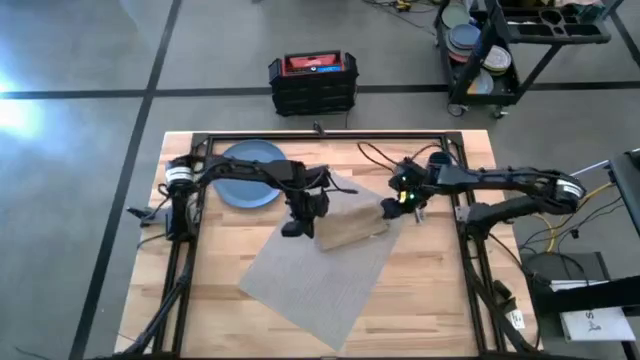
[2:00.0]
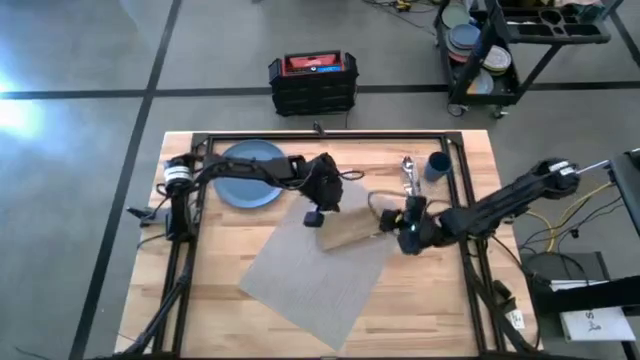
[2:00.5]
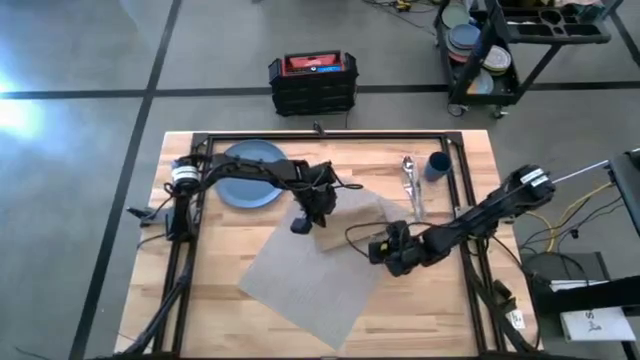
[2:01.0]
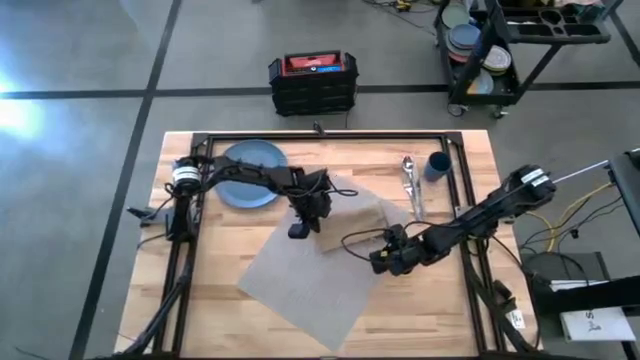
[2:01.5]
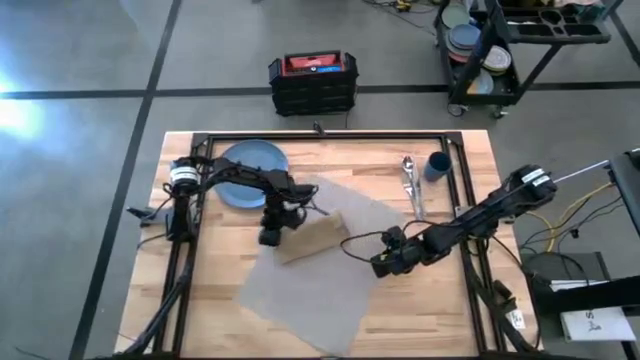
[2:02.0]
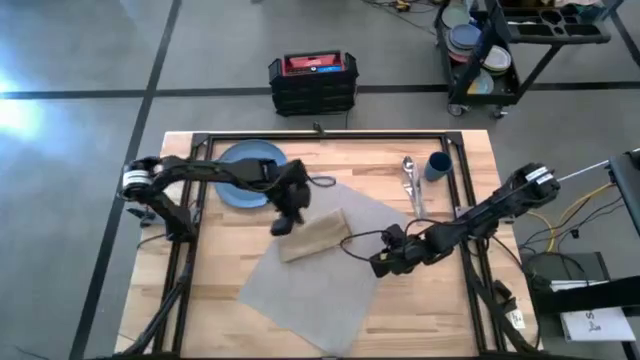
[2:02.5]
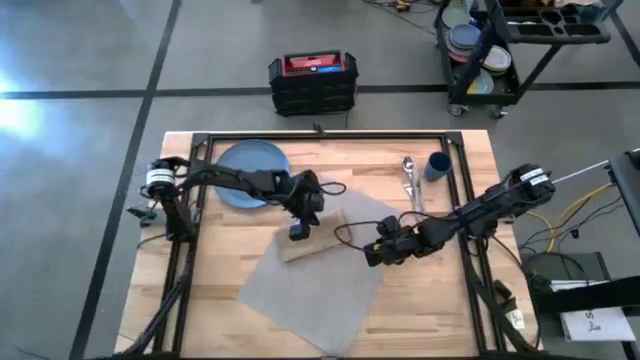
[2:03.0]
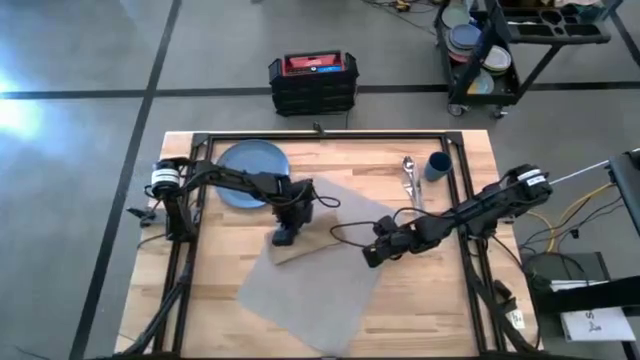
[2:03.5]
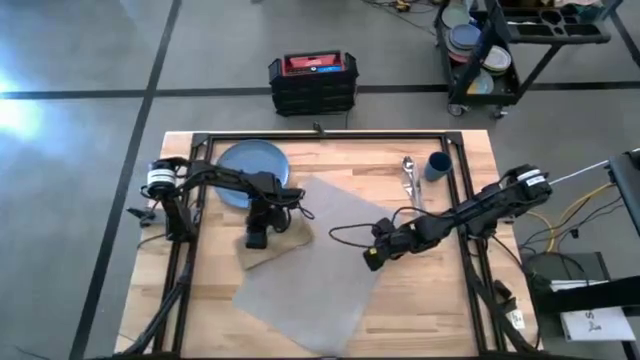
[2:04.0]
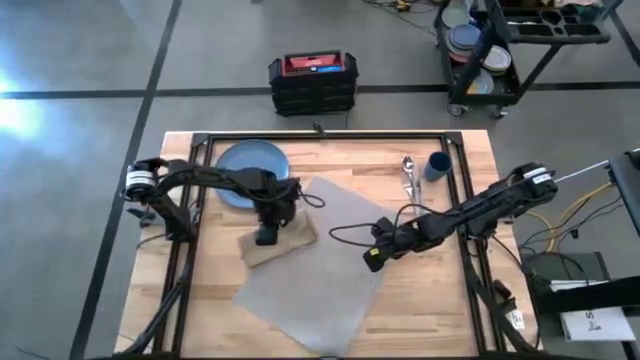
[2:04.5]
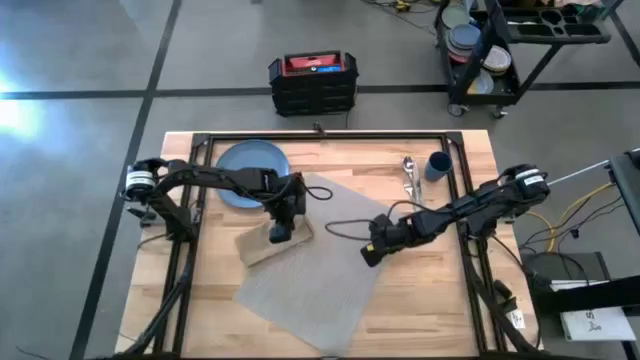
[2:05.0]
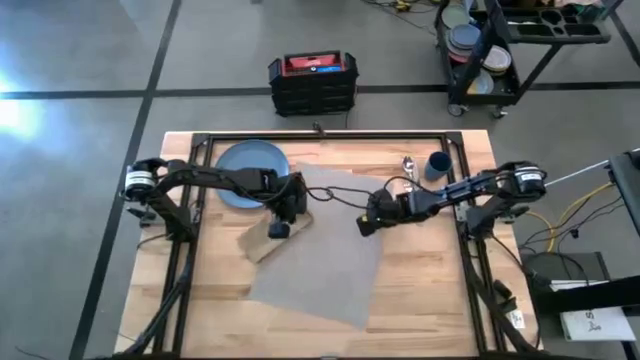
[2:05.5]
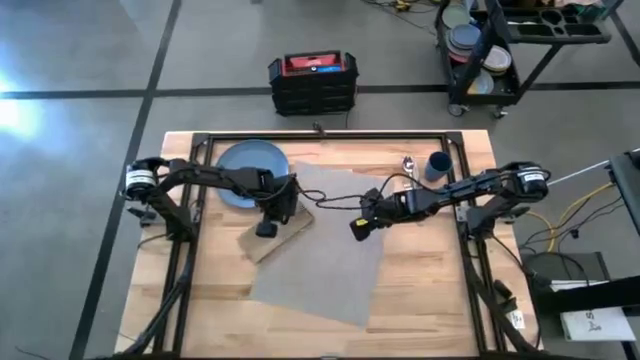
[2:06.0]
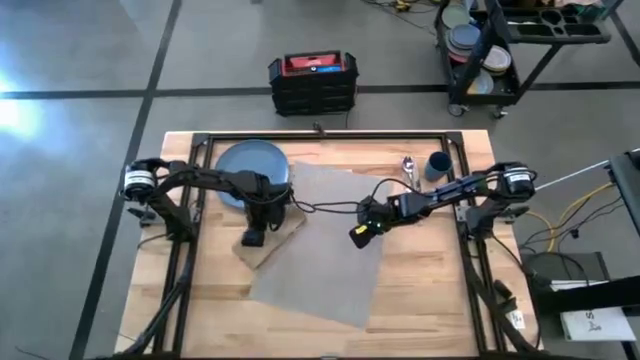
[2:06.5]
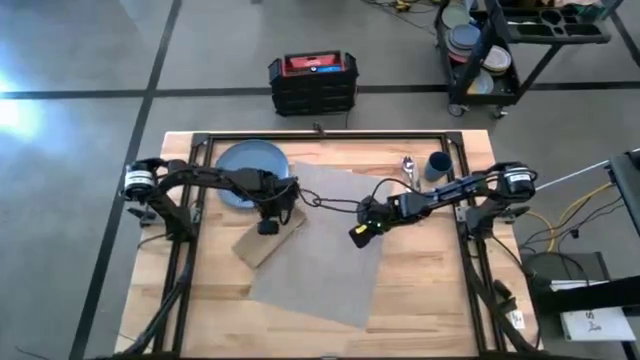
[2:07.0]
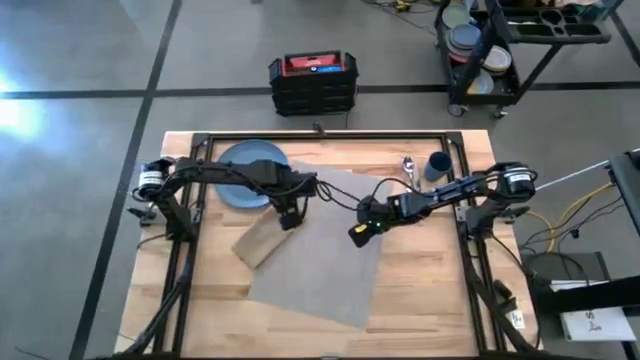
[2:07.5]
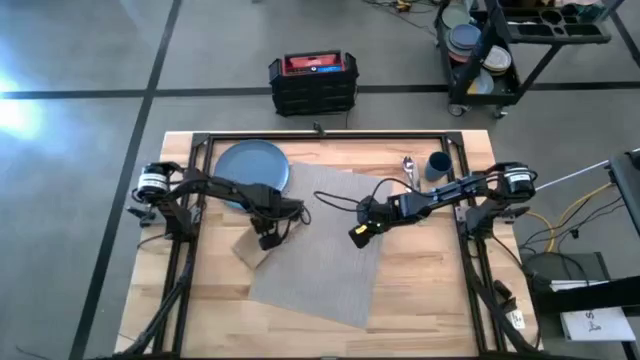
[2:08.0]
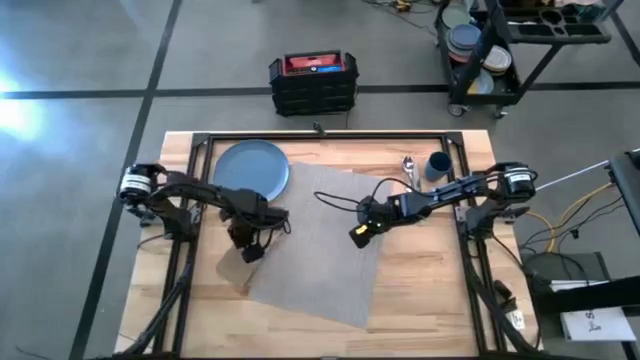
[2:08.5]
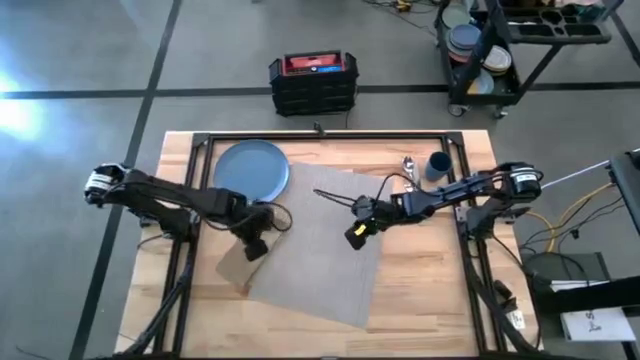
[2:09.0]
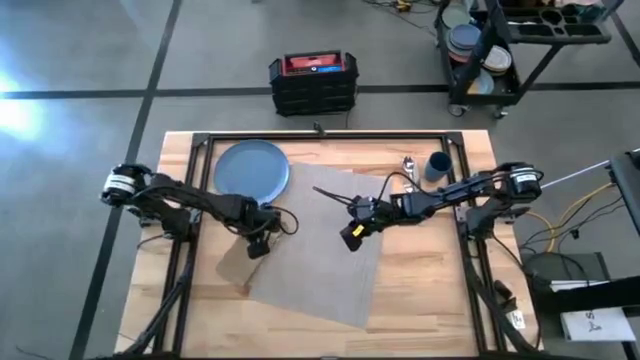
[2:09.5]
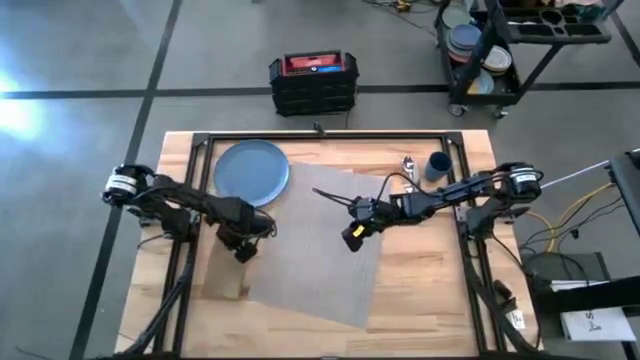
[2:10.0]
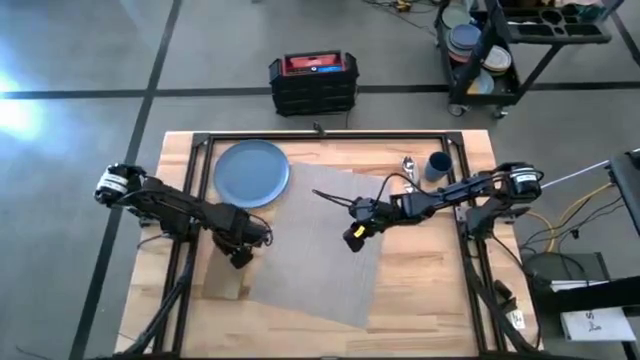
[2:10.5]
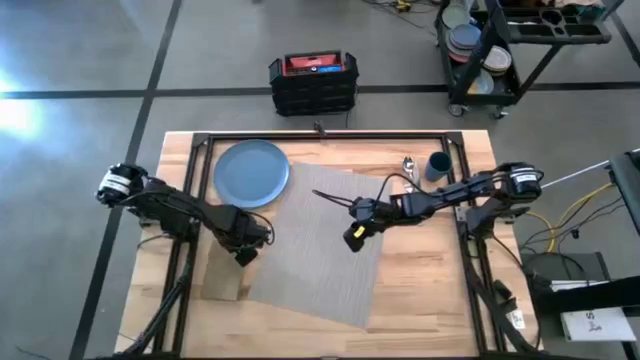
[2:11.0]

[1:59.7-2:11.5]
Task: Set table place
Move the brown table napkin to the middle left of the table

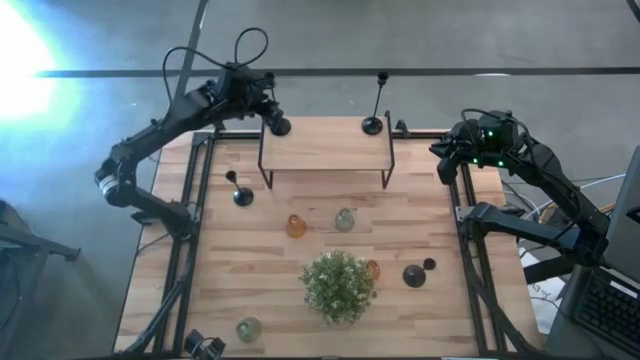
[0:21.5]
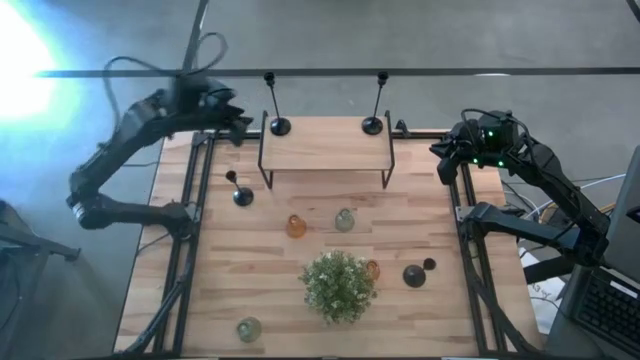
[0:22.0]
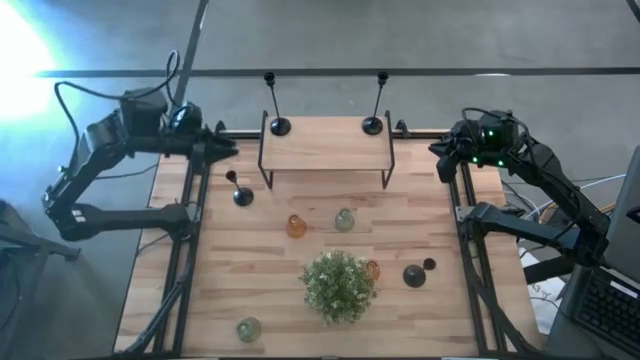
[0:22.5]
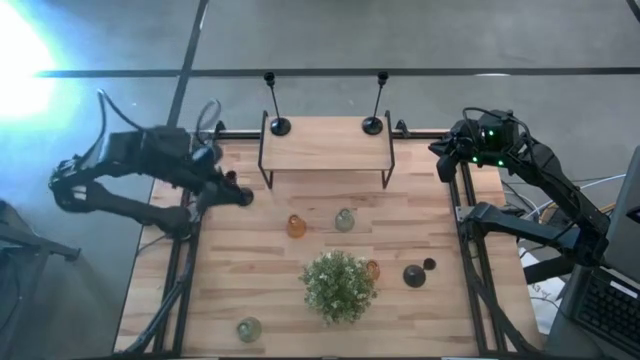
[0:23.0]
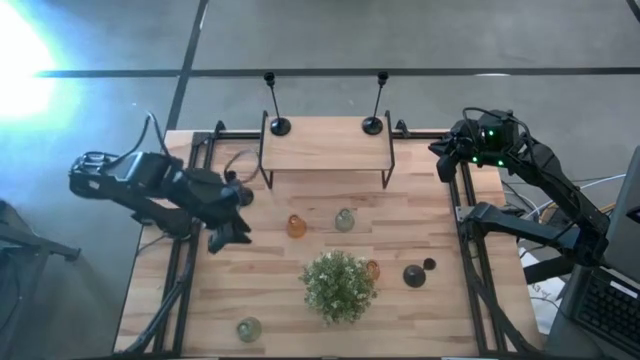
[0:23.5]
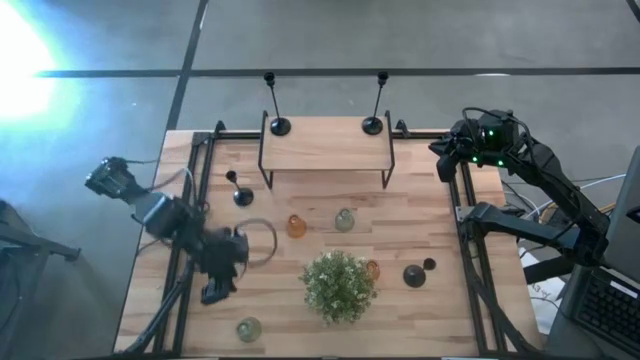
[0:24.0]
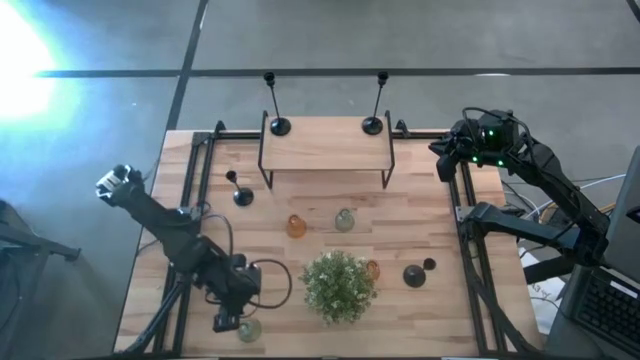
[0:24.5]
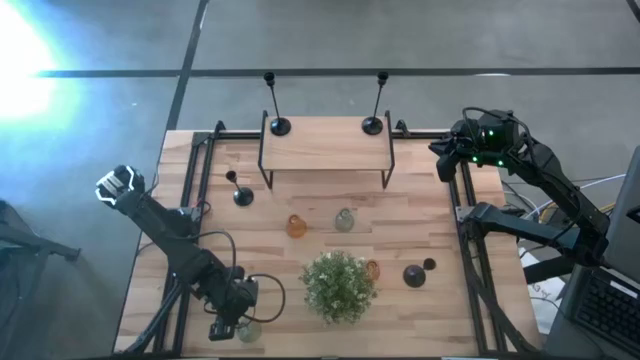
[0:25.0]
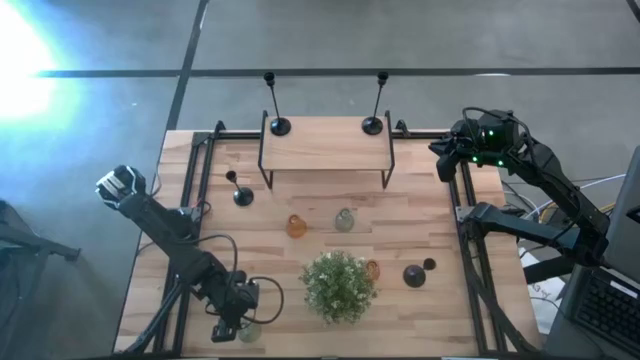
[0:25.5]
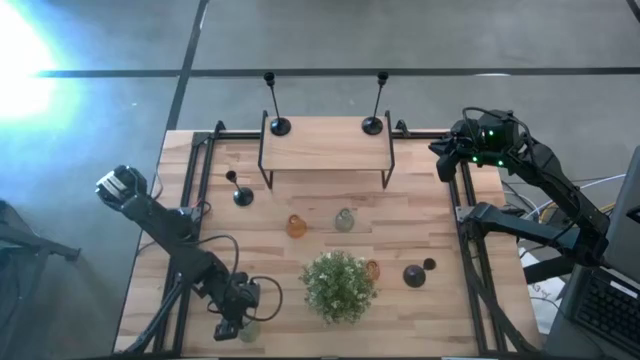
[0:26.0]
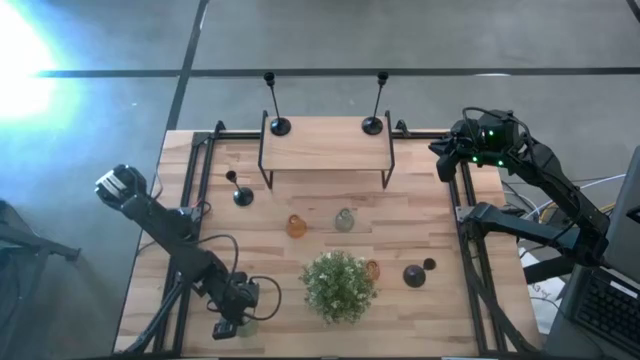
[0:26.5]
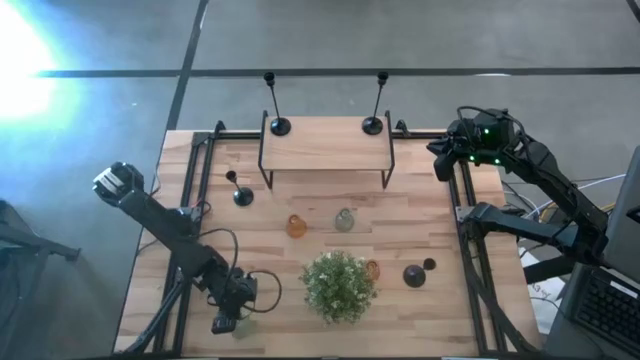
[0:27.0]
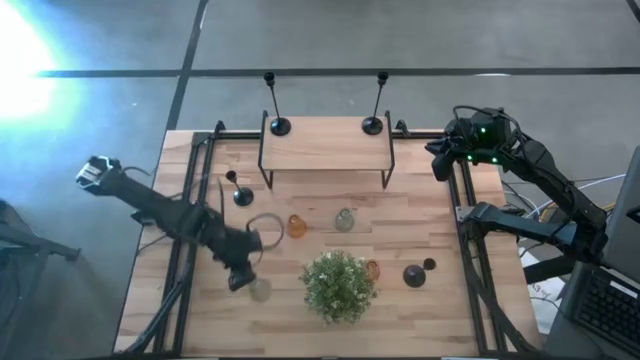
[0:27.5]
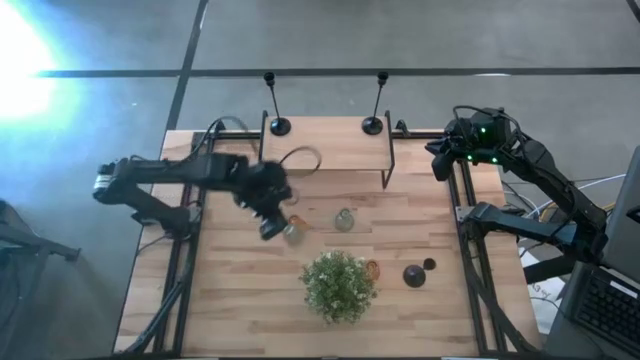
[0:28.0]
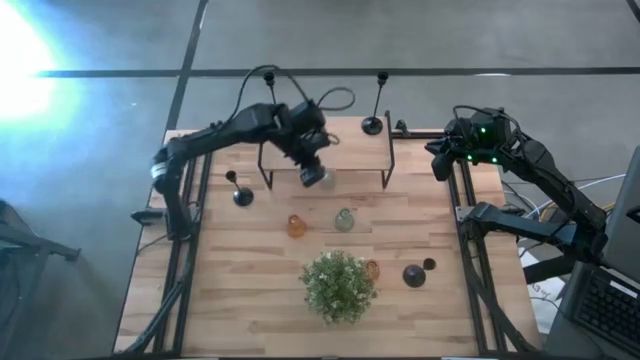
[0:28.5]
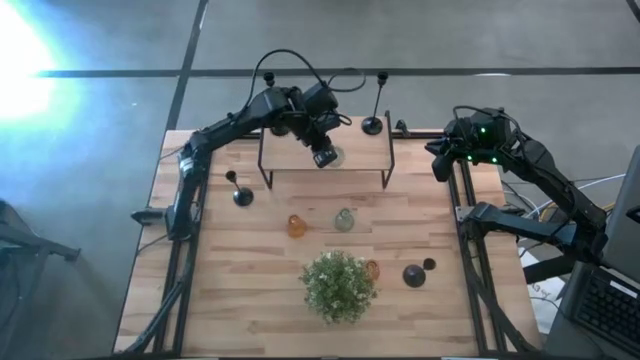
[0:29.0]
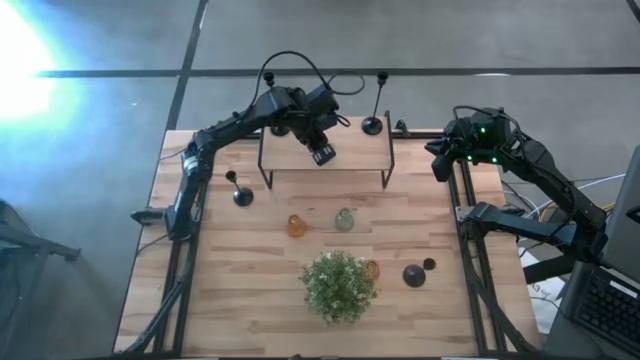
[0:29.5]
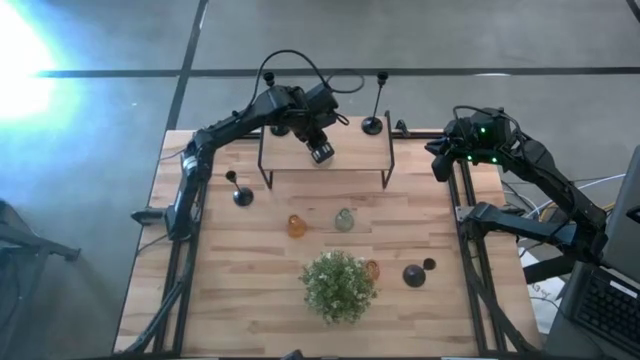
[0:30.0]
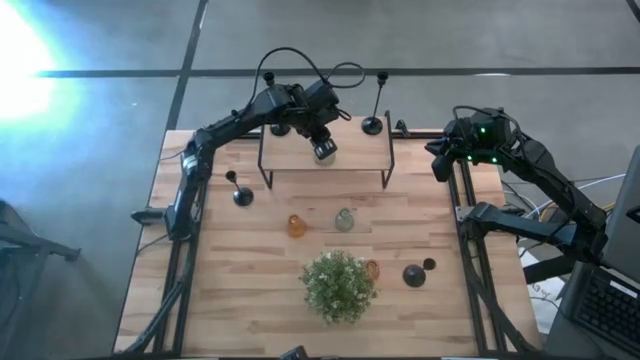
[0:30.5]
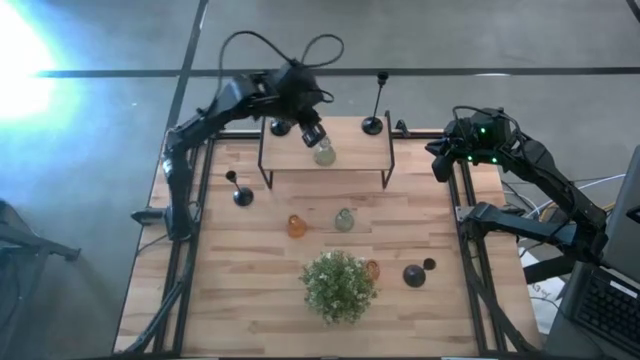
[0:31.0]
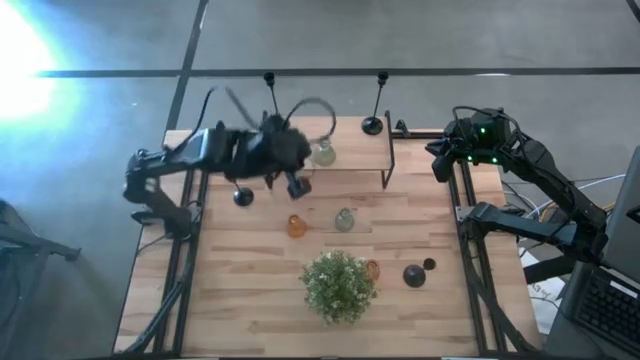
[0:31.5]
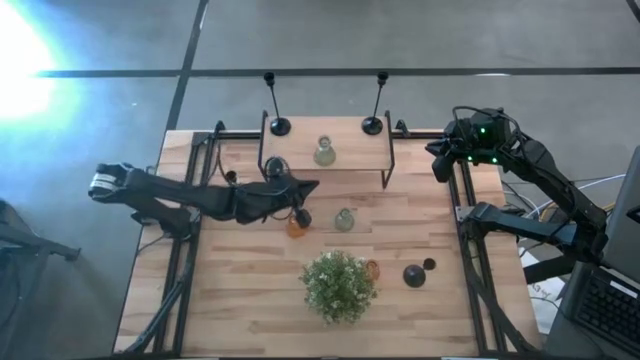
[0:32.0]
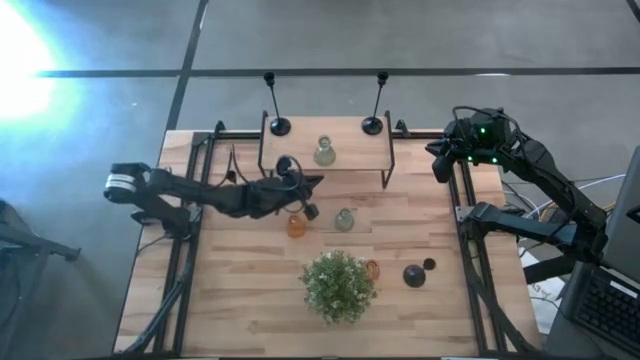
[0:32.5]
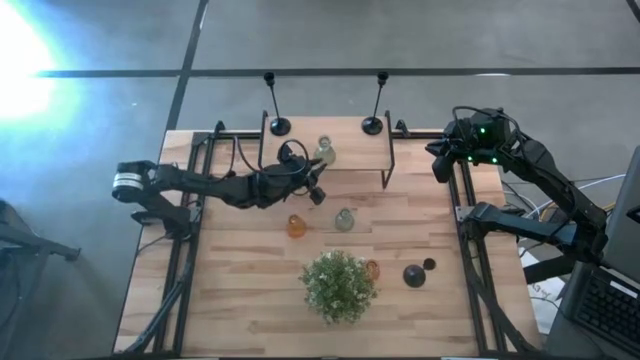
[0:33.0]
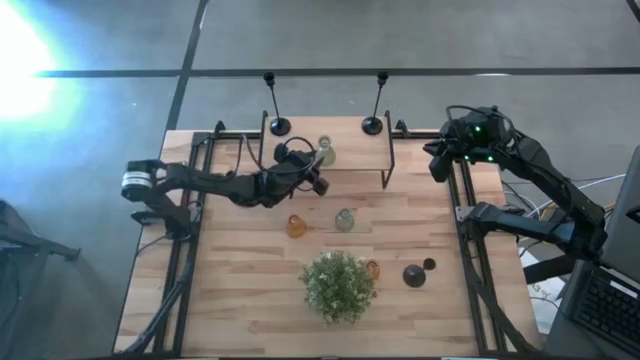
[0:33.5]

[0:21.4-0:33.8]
Task: Pick & Place candle stick holders
Put the left green glass candle holder on the shelf
